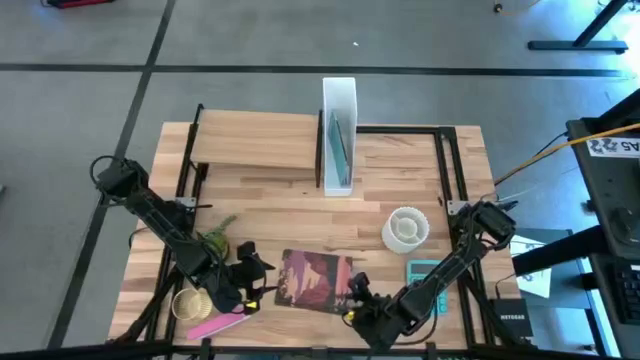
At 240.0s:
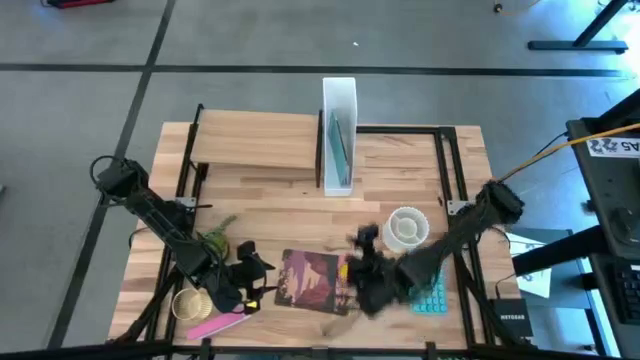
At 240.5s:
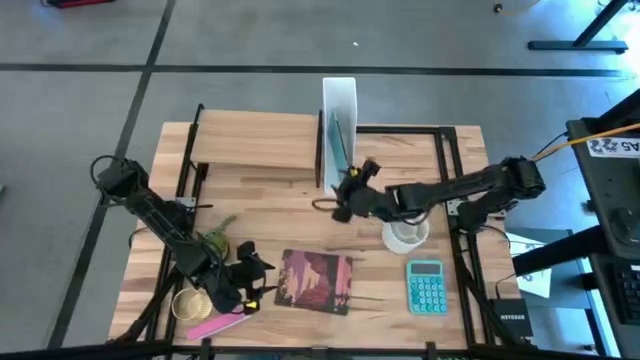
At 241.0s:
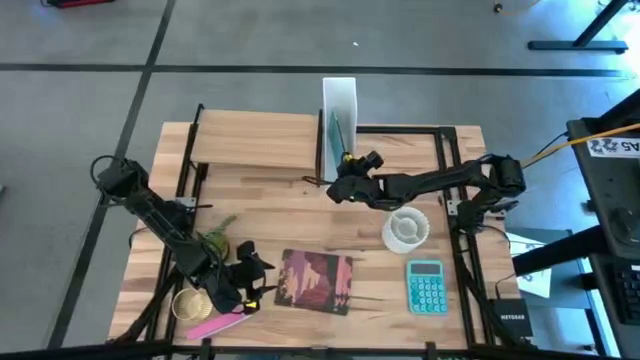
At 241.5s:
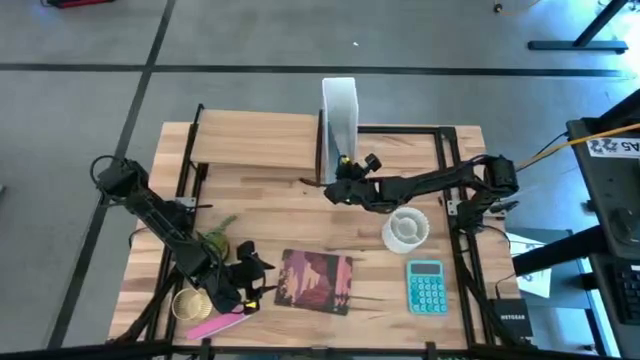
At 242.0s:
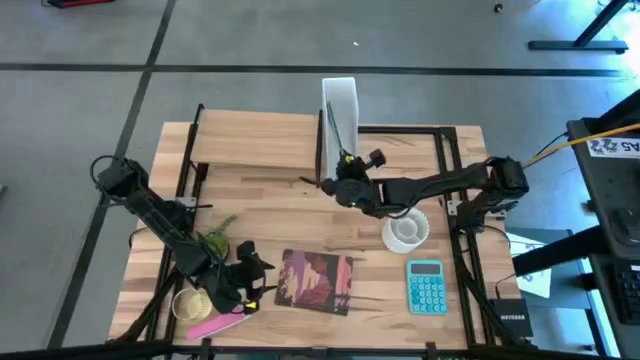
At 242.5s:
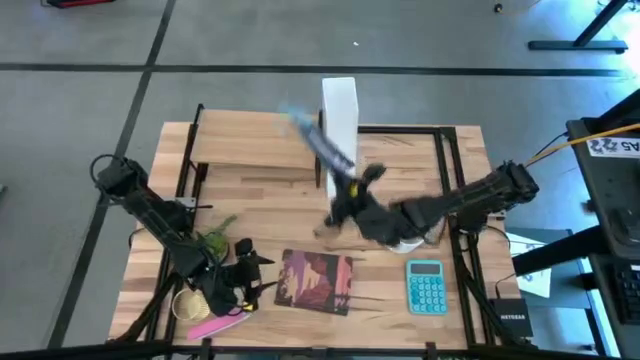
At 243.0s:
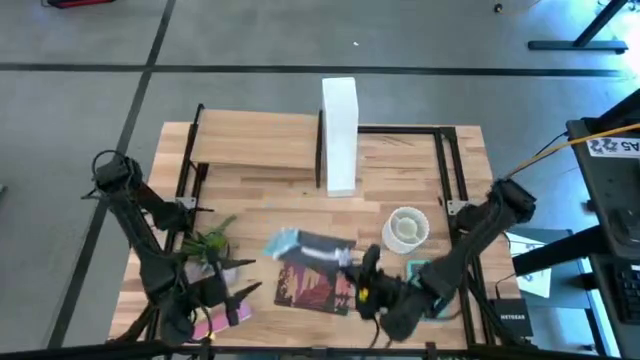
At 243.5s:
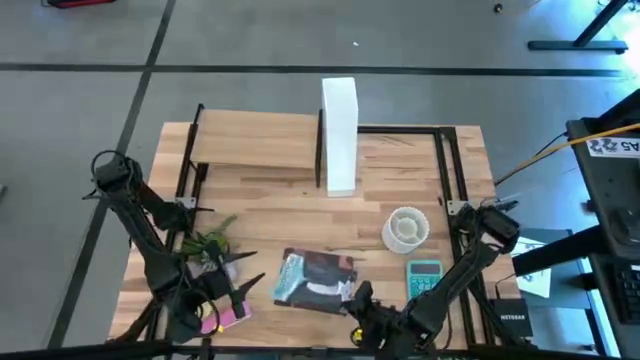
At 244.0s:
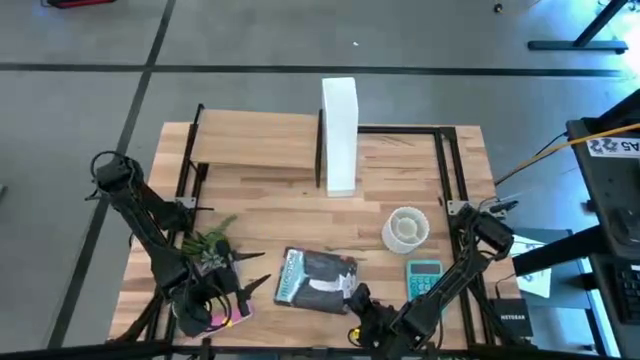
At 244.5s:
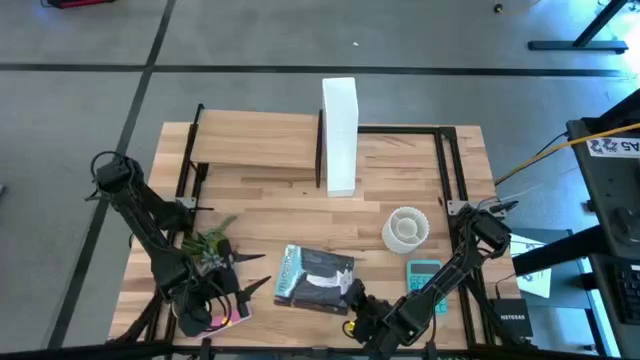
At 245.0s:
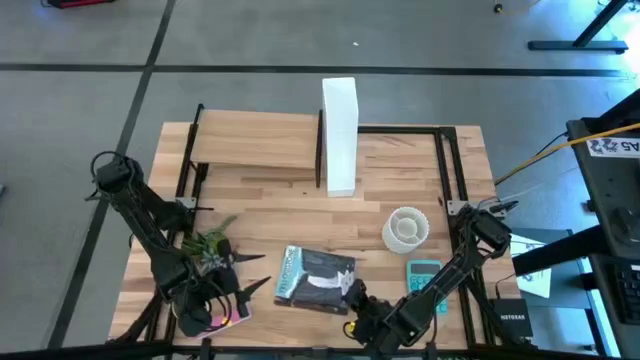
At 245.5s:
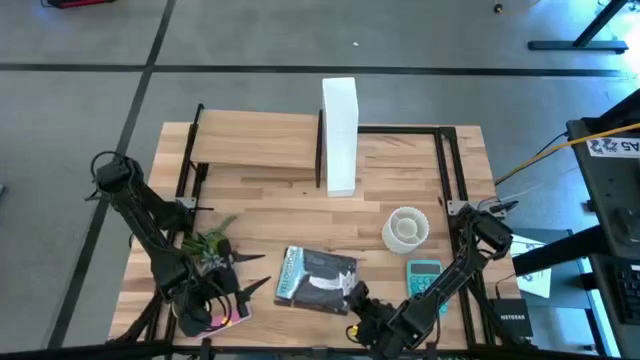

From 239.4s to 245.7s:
Task: Stock shelves
Remove the light blue book from the white bookshelf

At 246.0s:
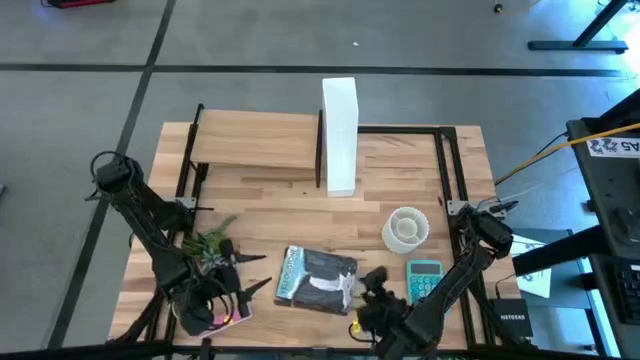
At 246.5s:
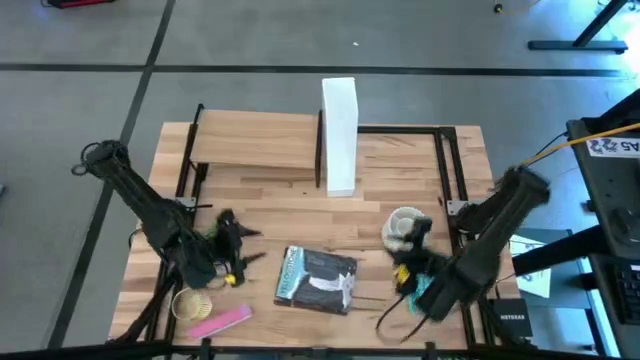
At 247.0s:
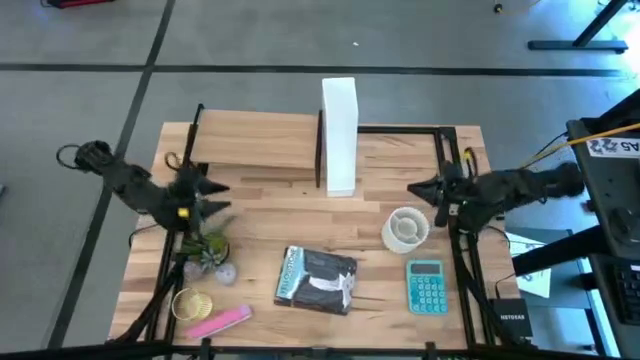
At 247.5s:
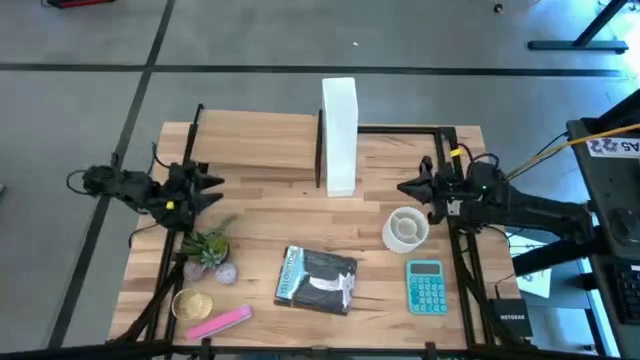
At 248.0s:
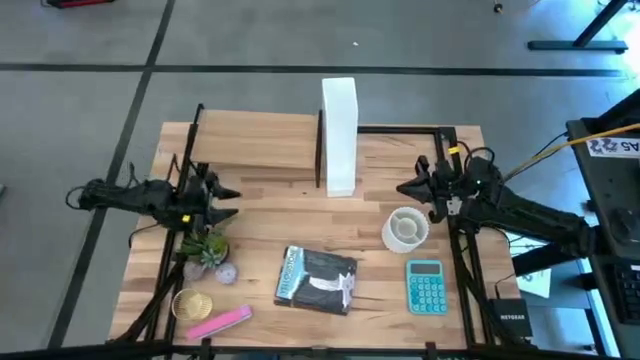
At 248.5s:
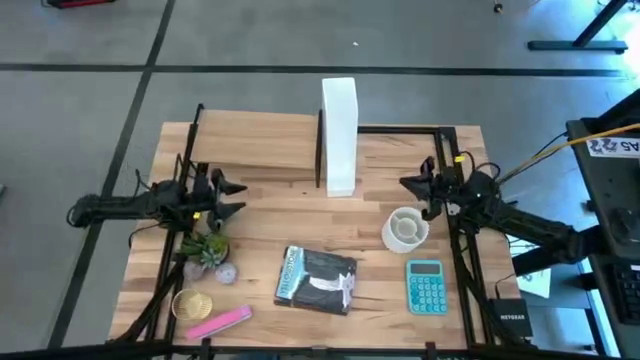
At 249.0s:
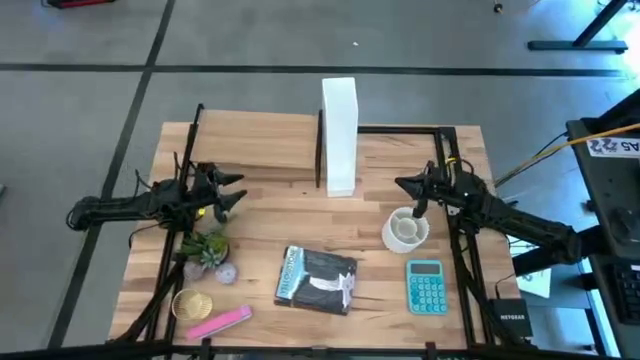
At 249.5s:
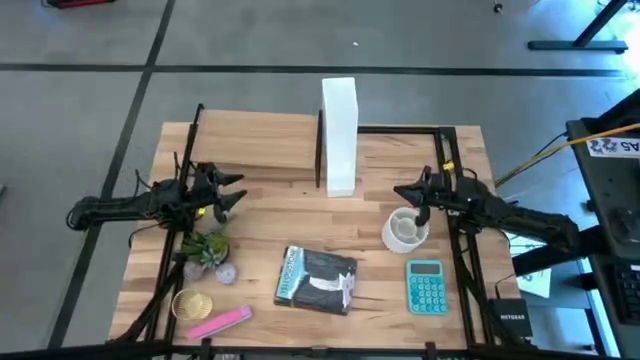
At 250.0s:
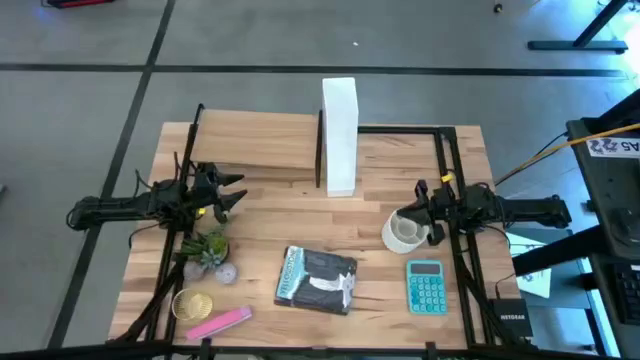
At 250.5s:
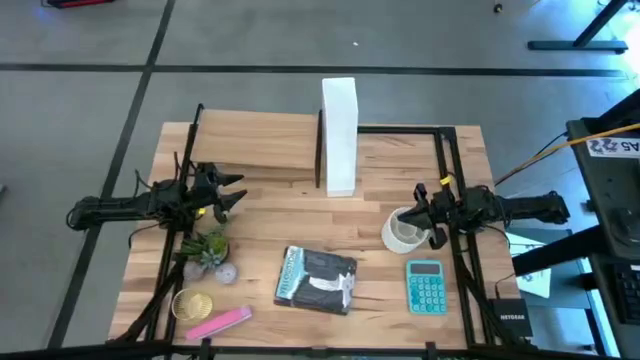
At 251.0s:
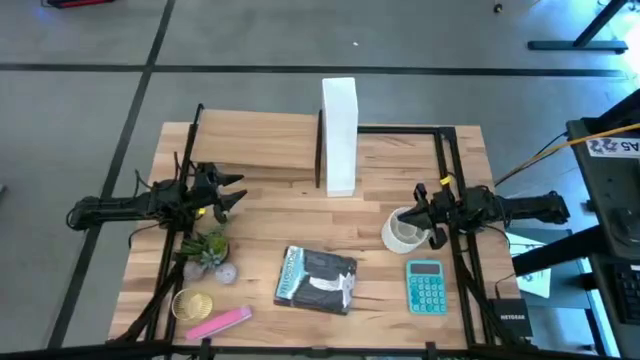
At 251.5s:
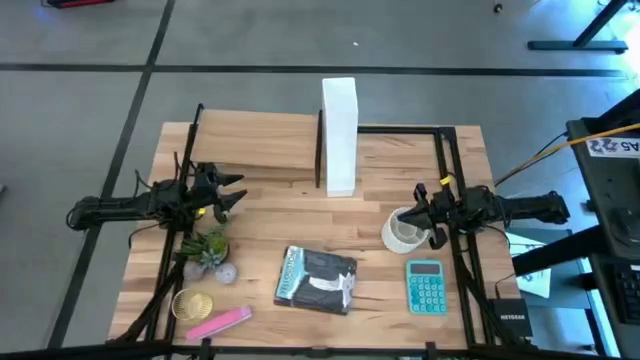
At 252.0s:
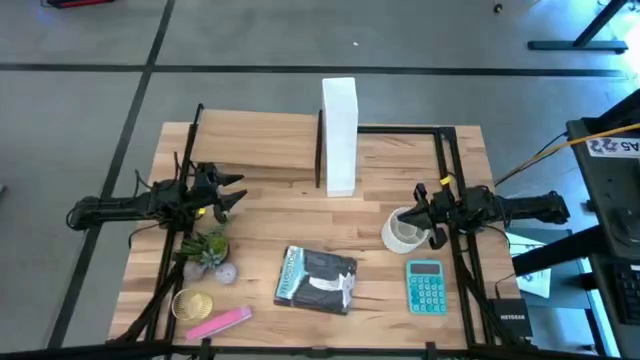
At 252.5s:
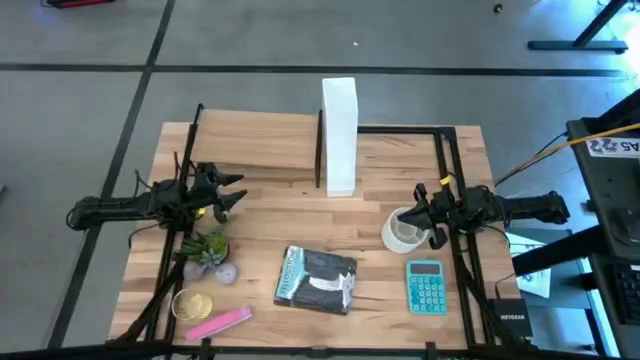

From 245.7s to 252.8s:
Return to Home Position

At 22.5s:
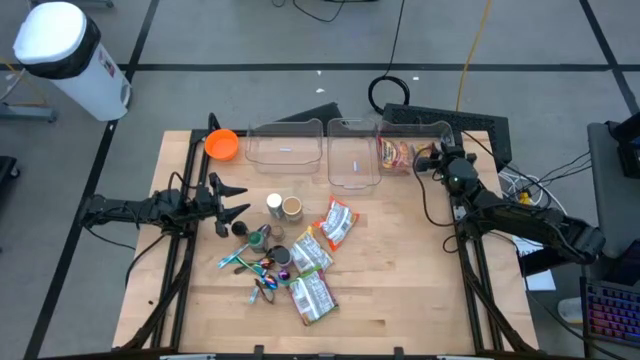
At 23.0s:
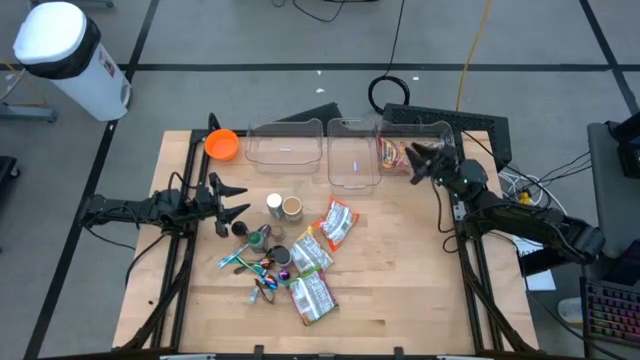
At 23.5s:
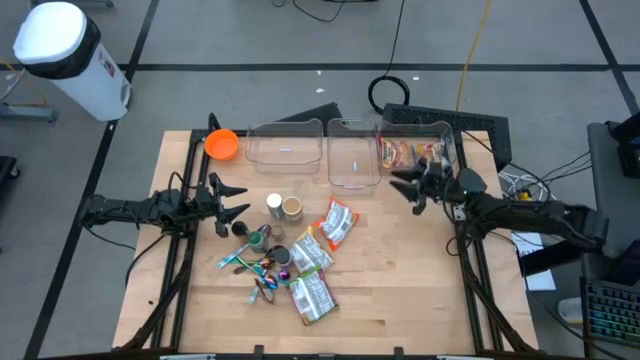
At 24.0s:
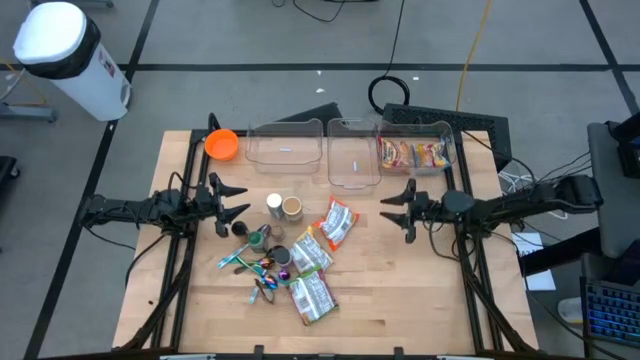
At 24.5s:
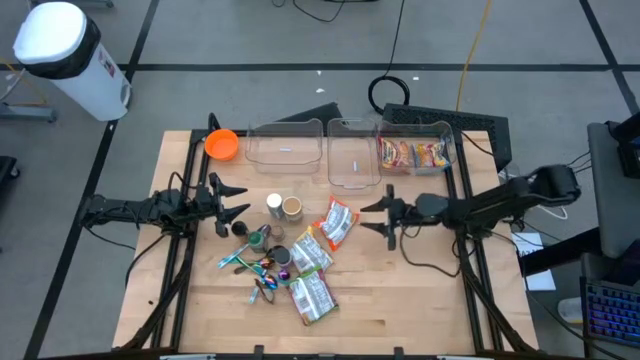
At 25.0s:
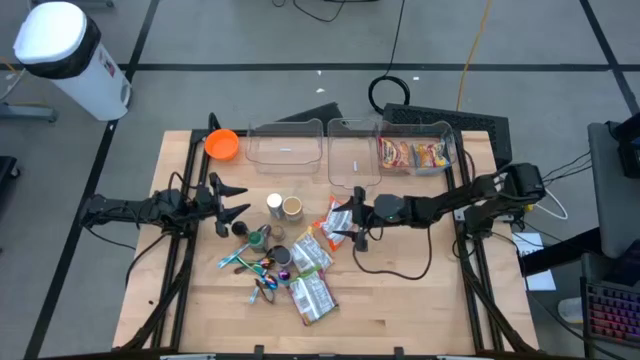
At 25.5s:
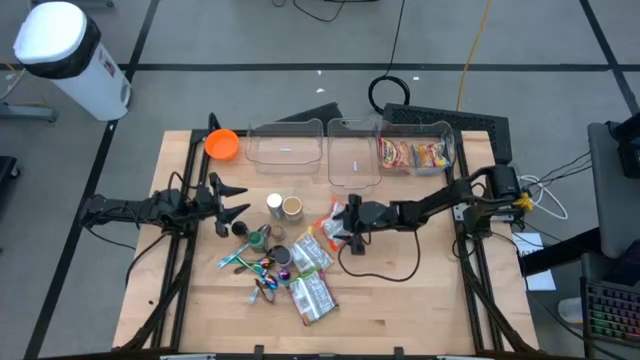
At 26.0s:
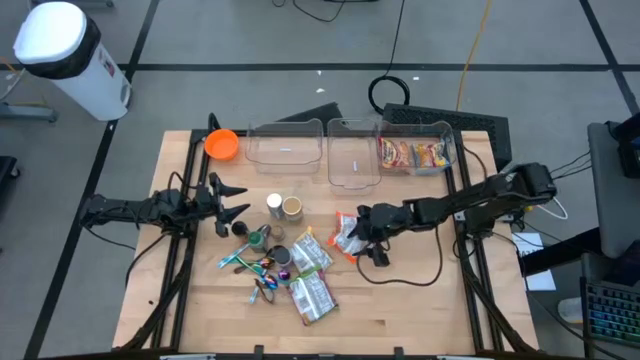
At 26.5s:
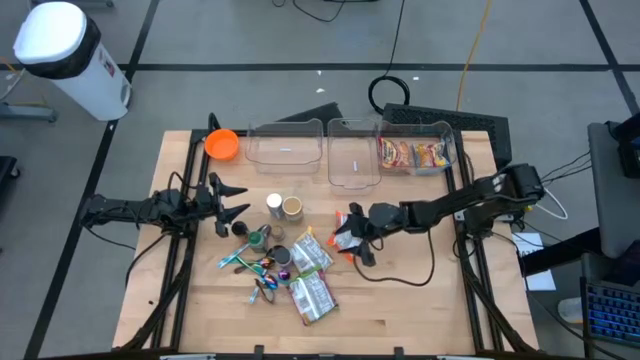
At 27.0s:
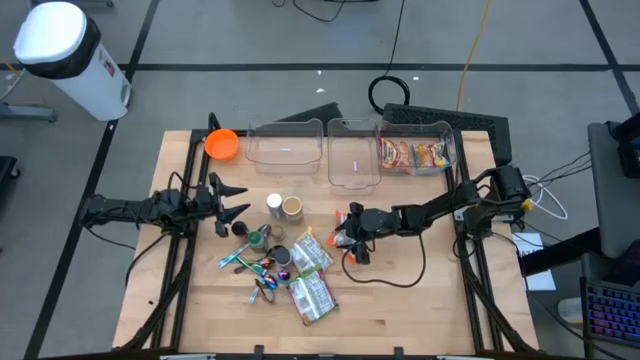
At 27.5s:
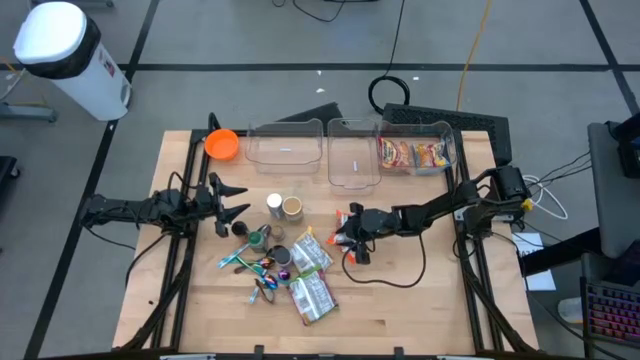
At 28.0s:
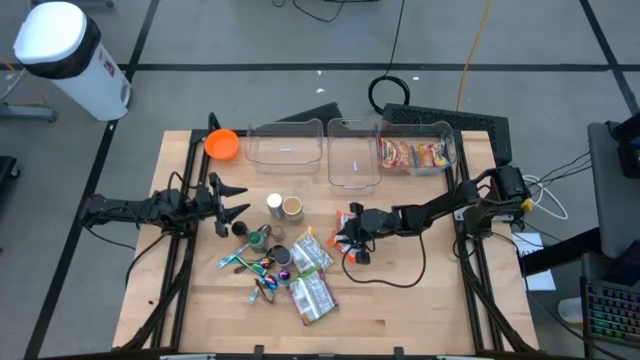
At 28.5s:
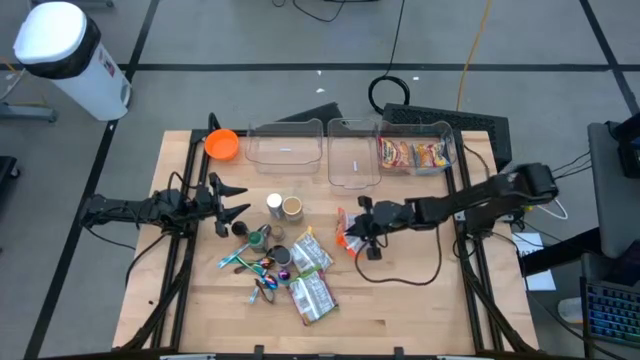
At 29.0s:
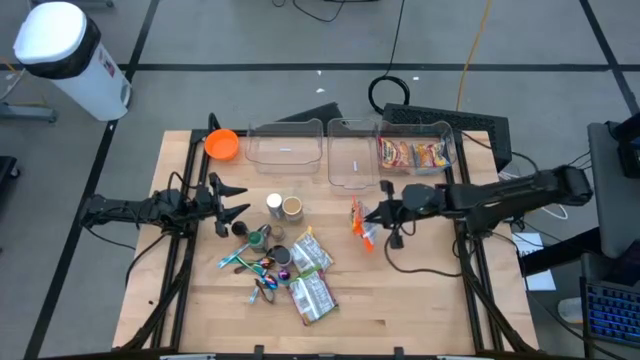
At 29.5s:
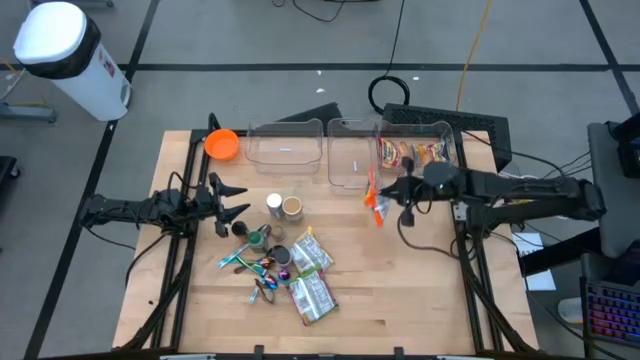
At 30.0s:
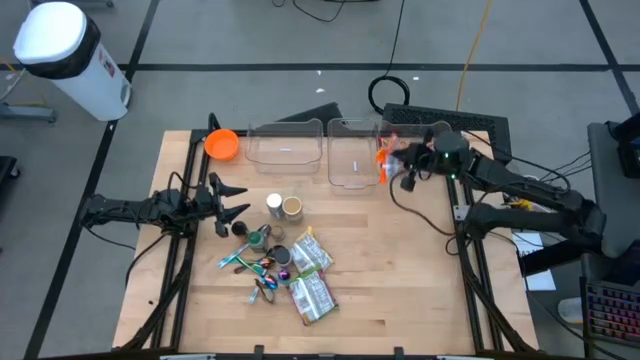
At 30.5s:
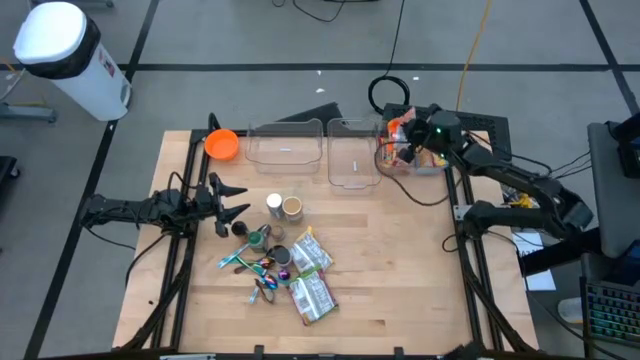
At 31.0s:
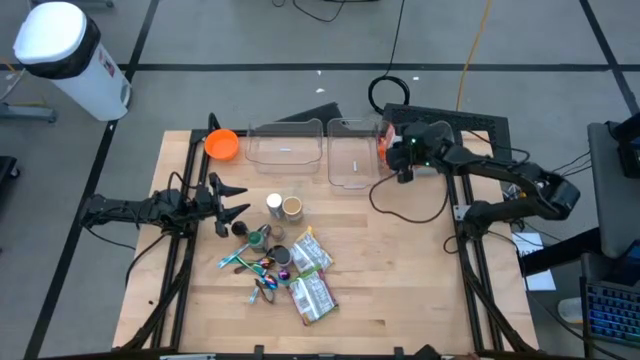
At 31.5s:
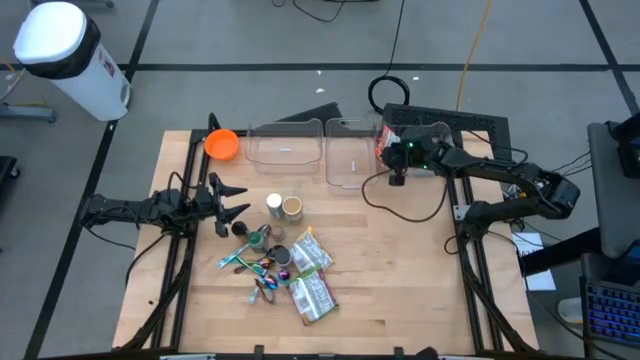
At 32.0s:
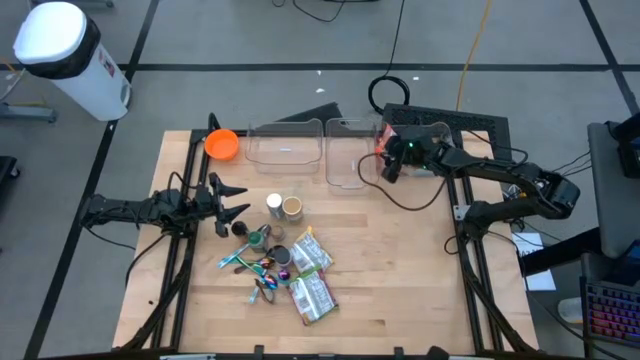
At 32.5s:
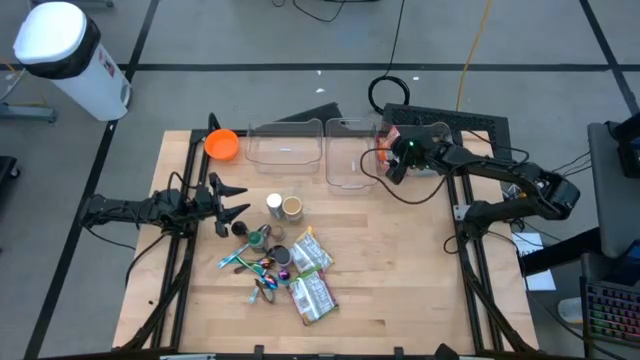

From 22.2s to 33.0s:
Task: Pick & Place Food Item
Put the orange noodle pack into the right transparent bin
